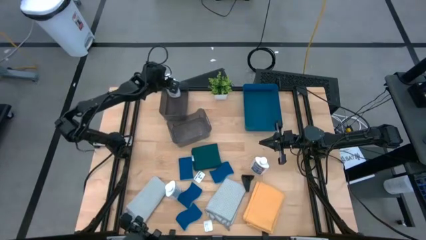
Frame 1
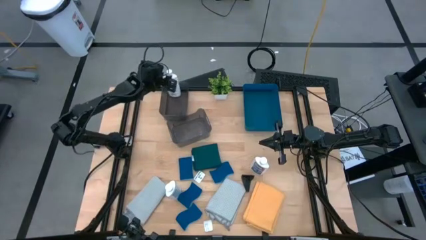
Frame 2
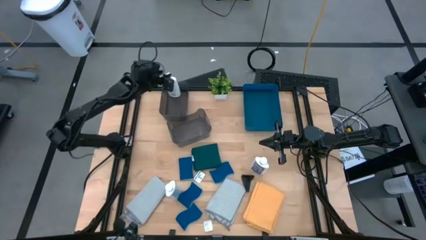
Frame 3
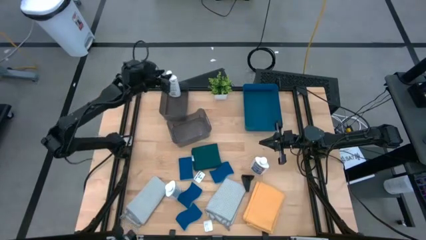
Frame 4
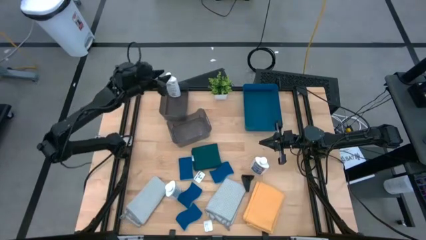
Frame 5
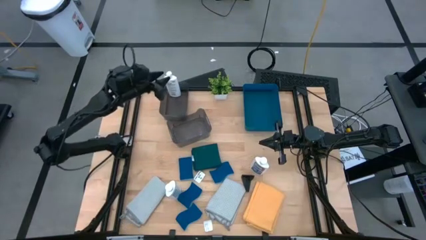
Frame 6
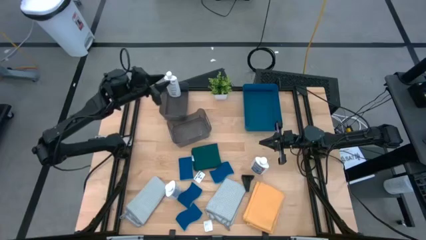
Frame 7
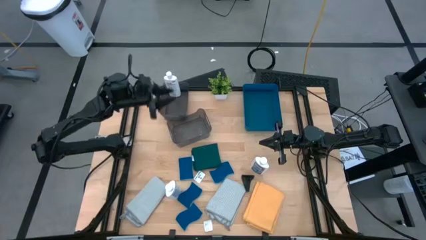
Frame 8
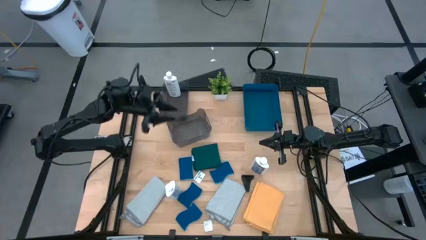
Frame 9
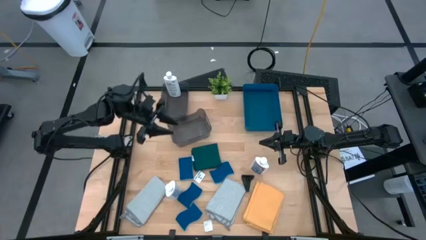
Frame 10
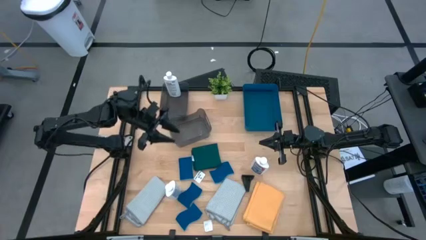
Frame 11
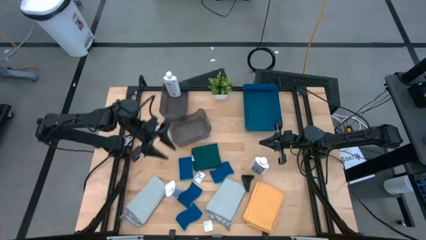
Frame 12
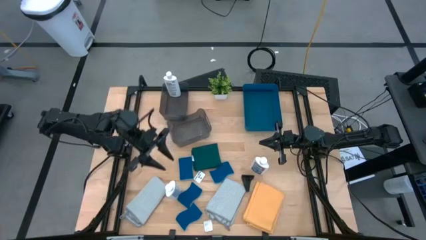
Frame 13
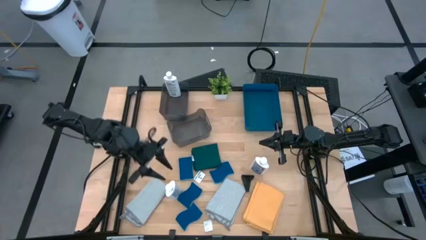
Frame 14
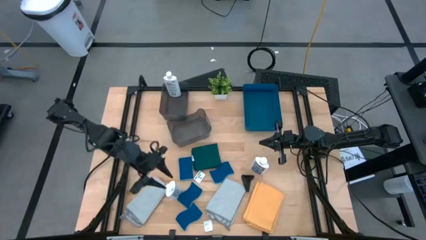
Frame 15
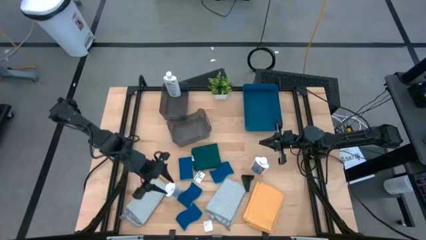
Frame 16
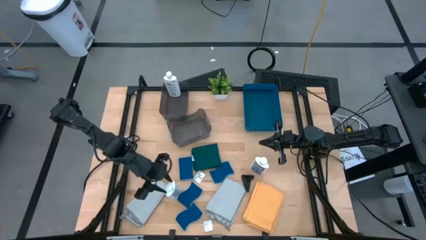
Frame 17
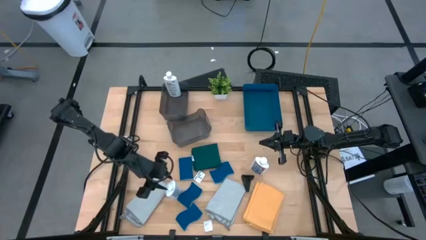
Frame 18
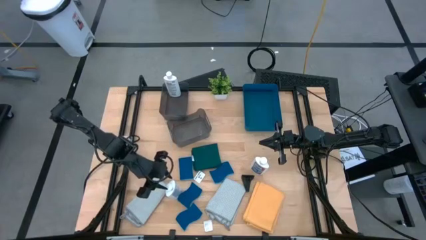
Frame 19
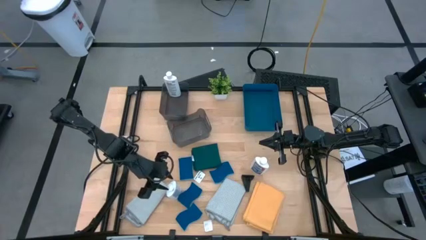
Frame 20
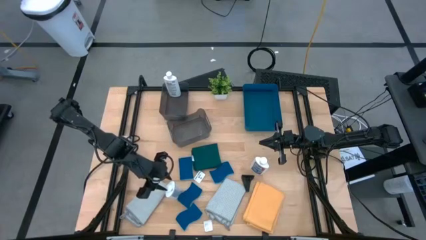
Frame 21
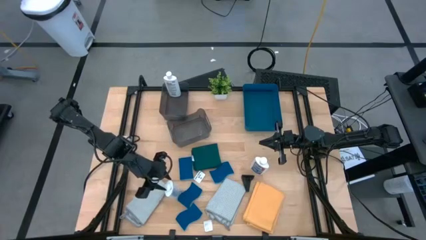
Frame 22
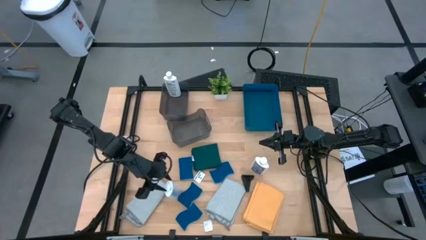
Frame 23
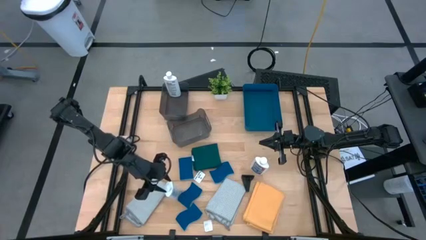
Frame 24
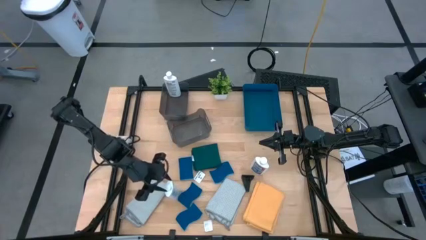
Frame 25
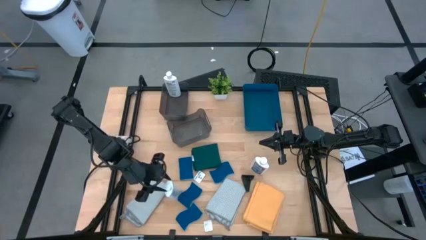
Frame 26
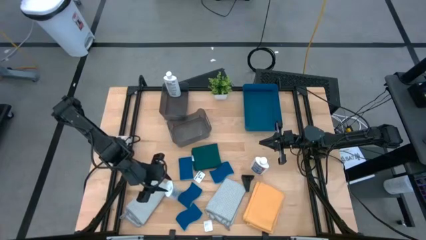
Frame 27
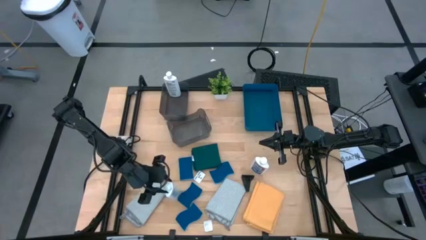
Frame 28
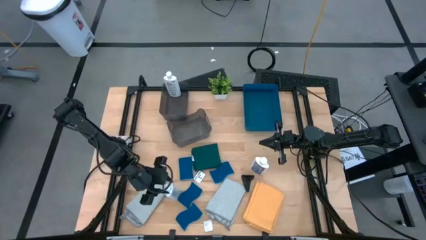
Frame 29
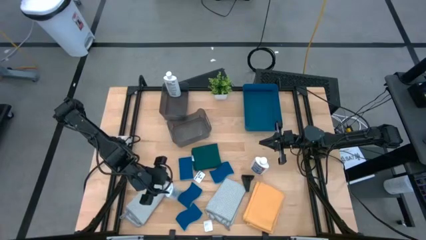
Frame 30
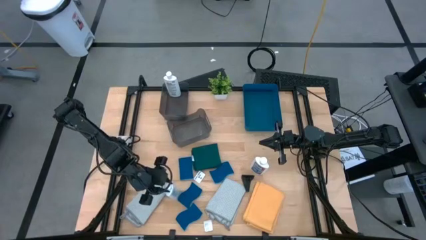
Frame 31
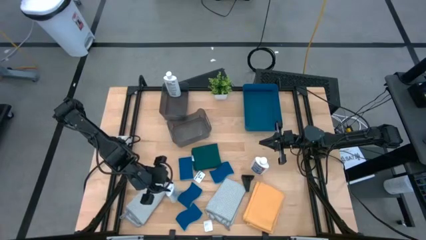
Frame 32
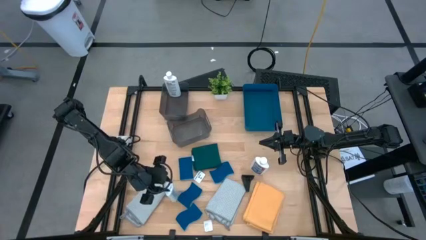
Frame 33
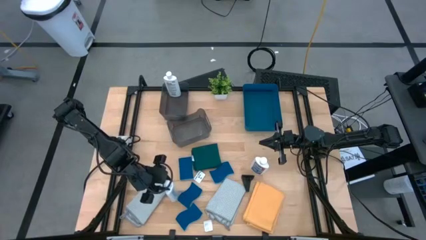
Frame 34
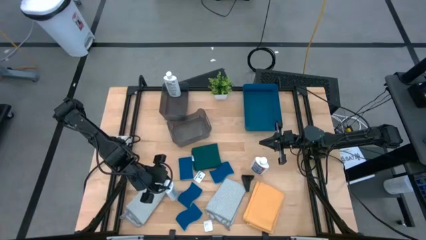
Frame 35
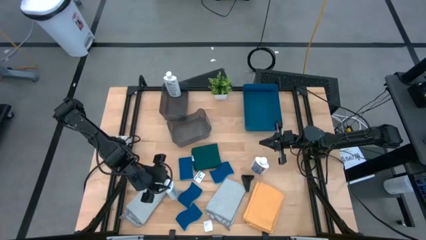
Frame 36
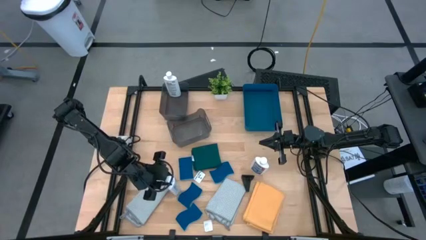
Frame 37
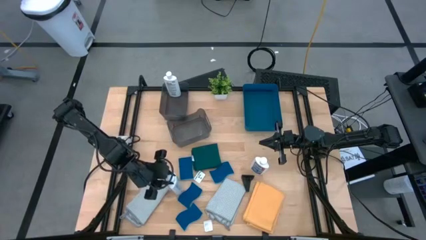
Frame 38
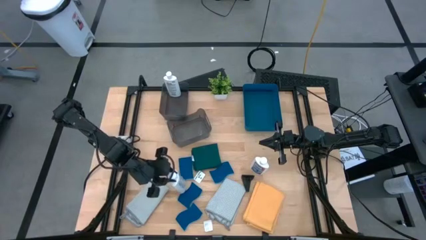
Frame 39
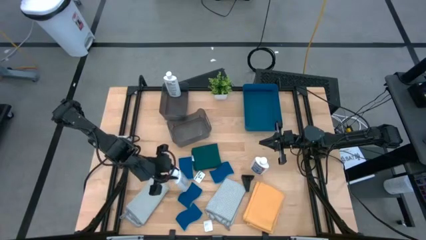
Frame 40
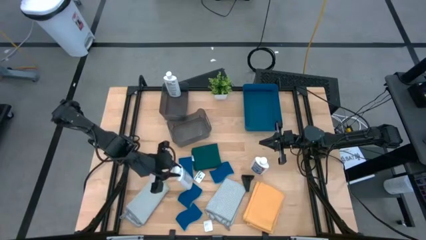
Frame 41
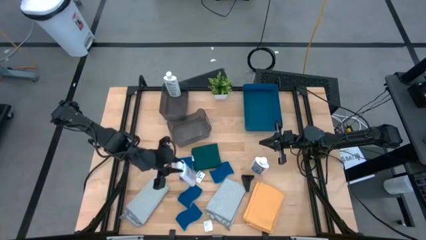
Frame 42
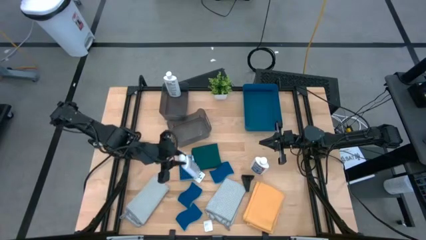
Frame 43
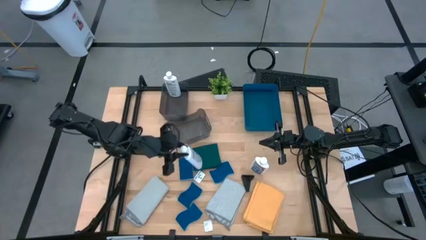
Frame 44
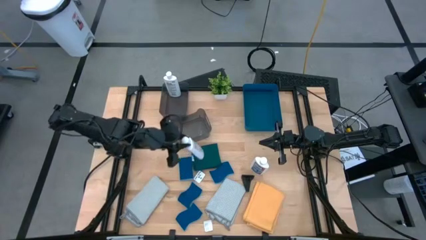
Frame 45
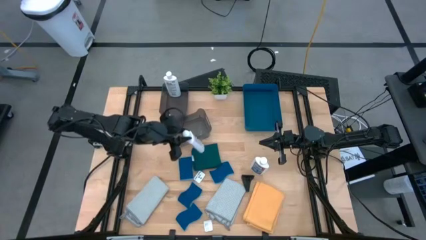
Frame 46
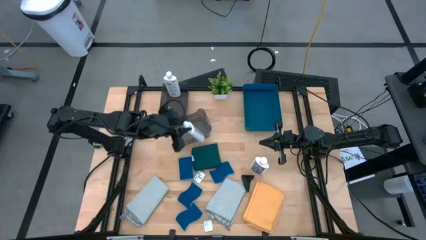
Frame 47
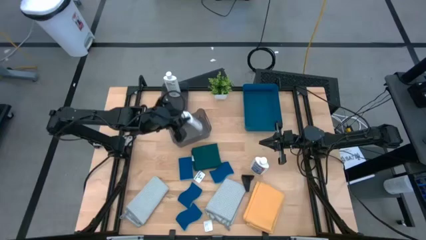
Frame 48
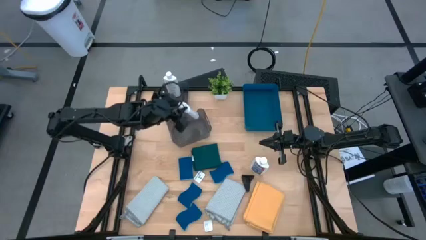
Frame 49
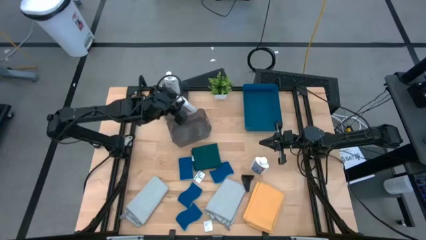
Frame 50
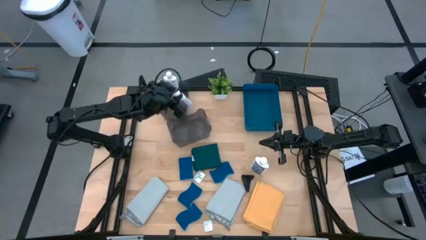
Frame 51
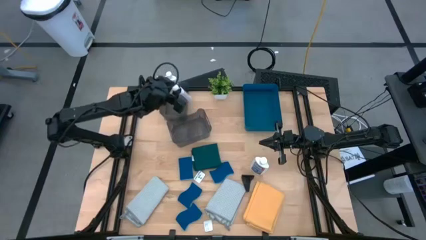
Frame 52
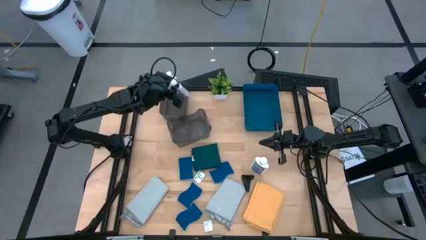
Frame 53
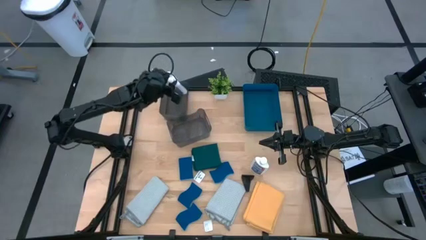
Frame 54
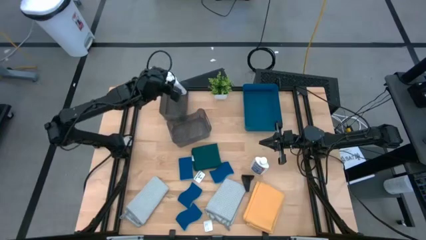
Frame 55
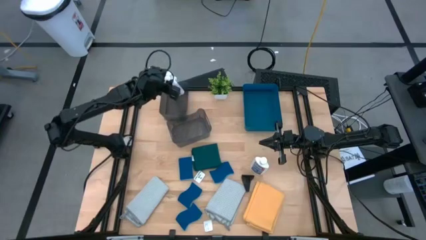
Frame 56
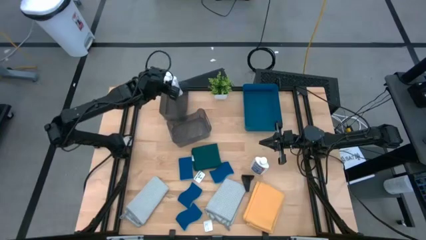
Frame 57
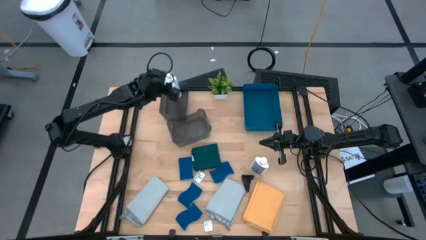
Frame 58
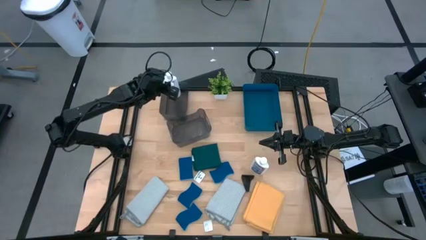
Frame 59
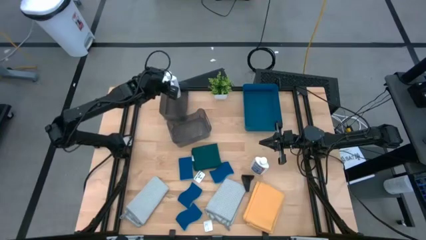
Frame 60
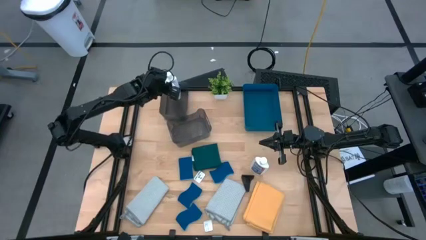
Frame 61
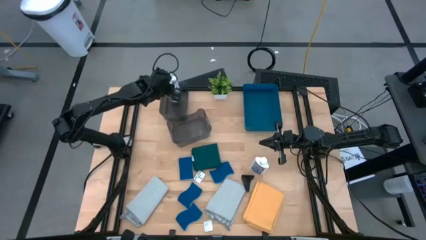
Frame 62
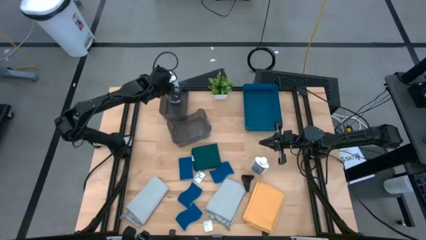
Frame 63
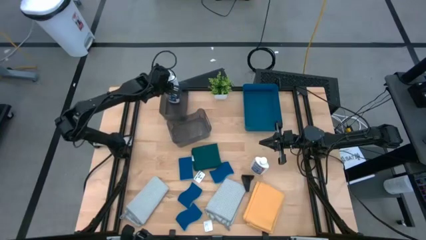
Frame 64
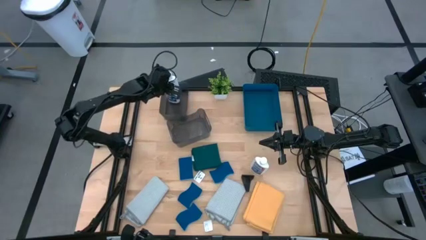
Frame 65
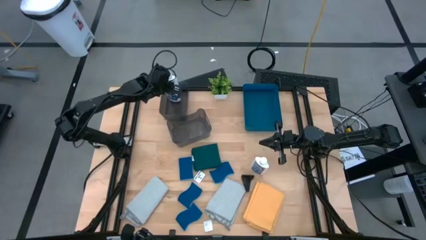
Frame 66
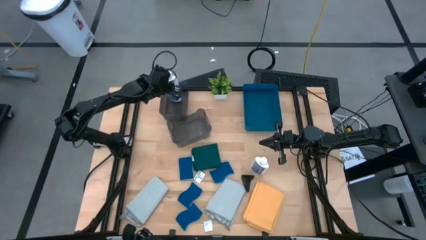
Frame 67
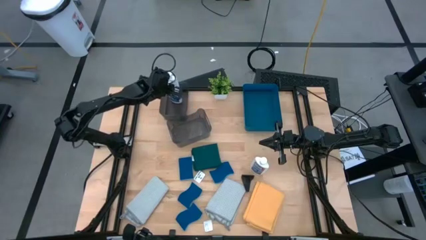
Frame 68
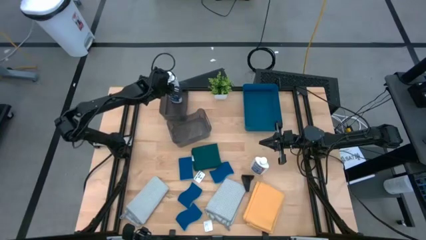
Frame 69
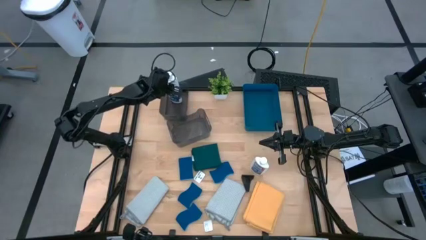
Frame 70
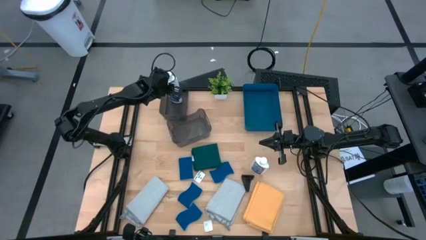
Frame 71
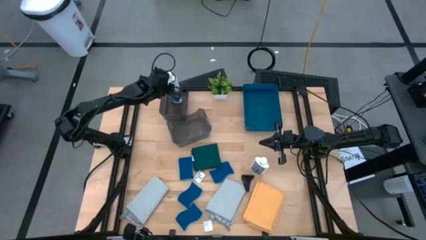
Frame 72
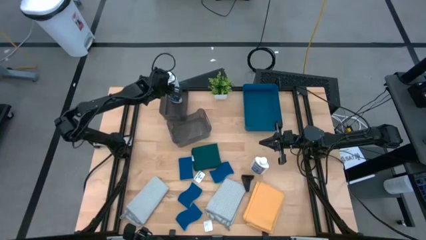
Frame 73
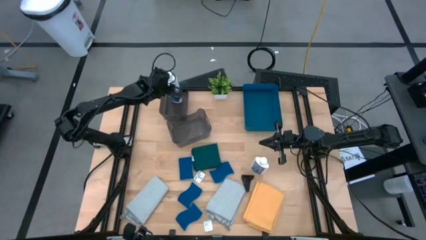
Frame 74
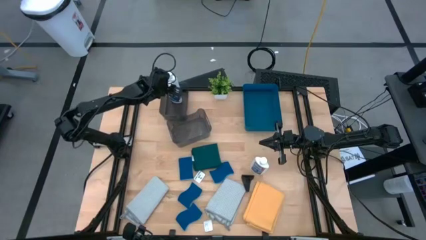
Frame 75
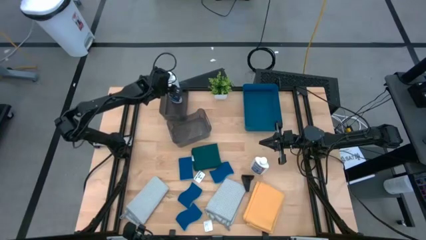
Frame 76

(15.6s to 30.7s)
Task: Pick & Place Kitchen Items
Put the white restorer into the top black bin

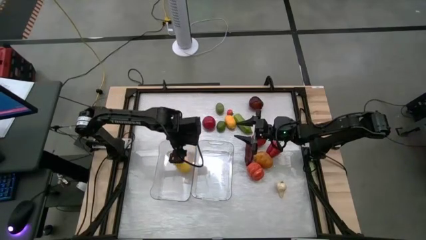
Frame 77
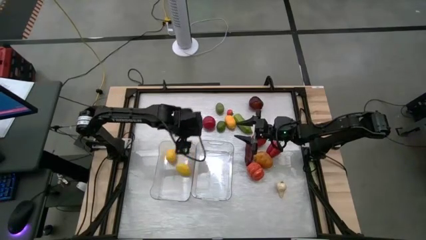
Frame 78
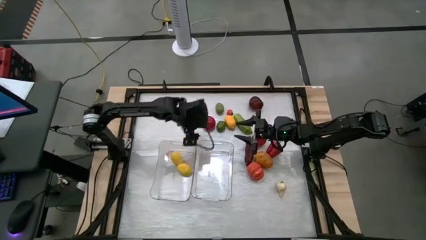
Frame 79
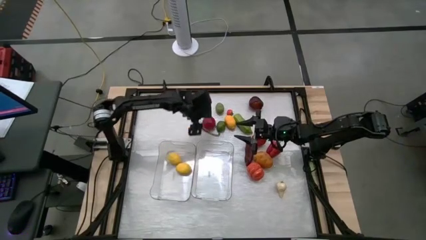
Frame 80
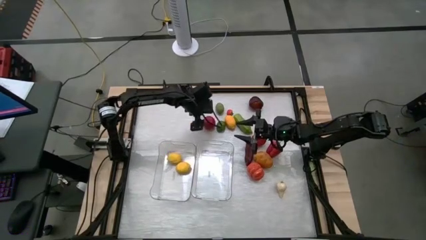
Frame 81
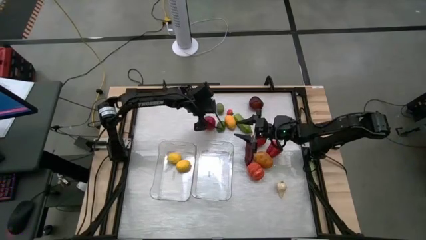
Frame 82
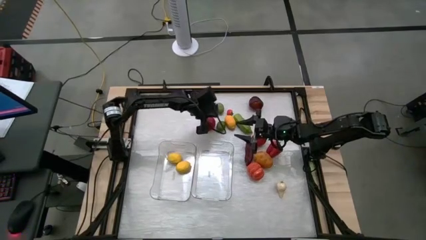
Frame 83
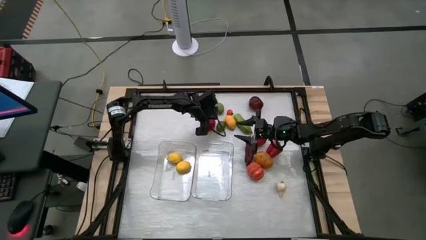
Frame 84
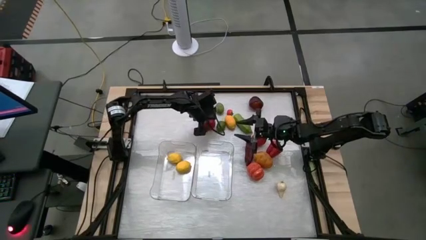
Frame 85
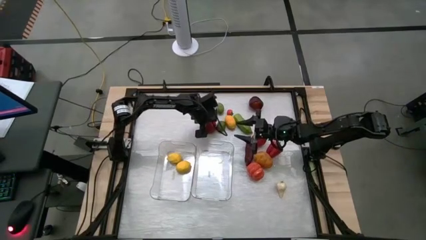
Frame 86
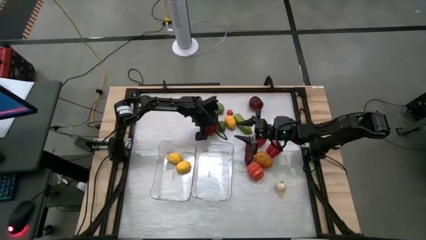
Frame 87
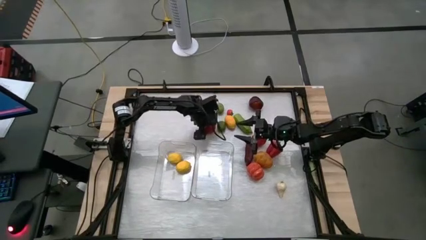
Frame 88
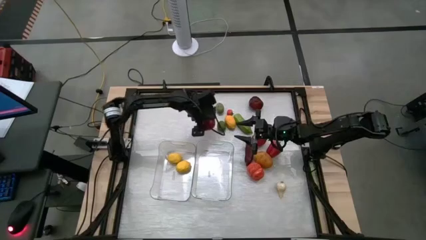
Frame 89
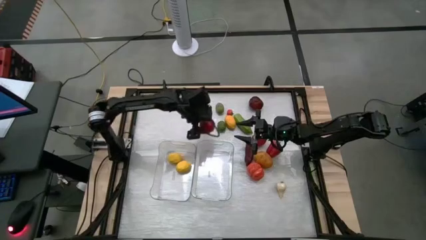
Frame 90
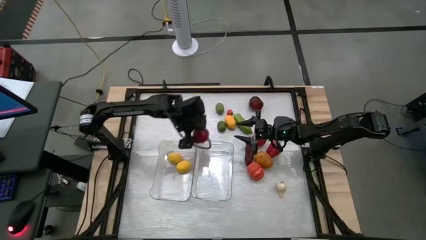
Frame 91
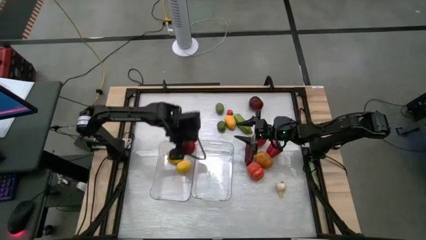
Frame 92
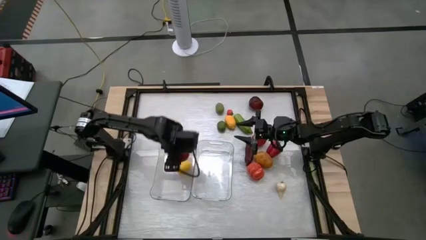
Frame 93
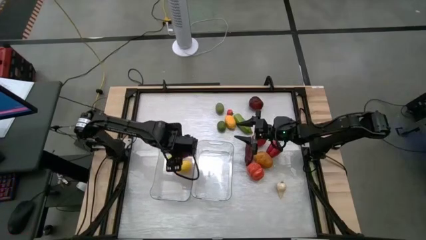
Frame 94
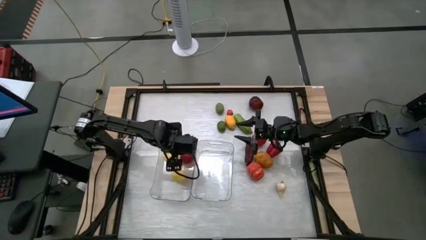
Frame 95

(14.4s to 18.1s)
Task: Sort produce into baskets
Put the tomato into the left transparent bin
